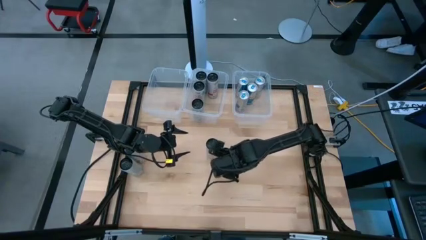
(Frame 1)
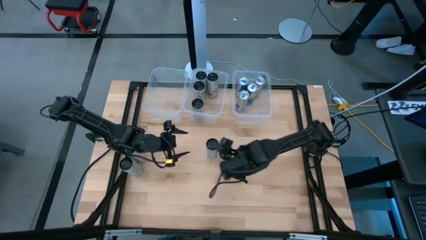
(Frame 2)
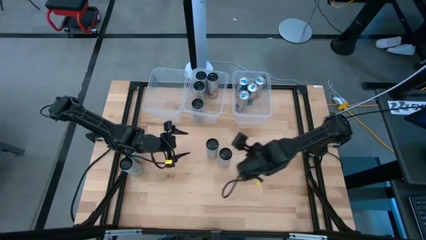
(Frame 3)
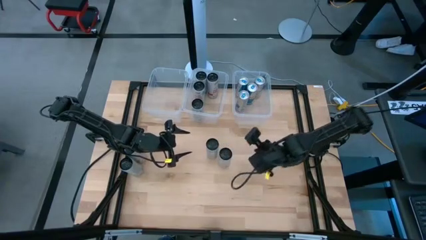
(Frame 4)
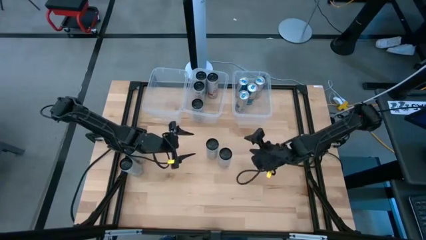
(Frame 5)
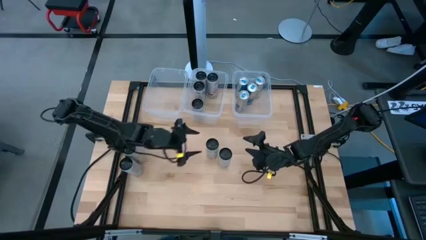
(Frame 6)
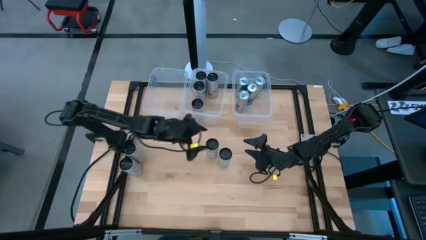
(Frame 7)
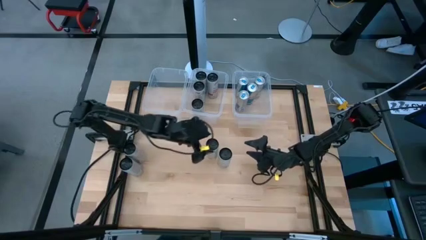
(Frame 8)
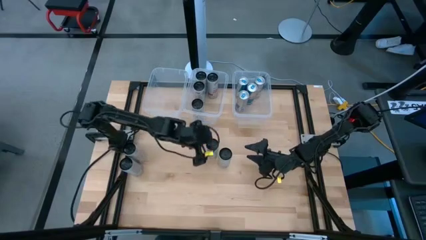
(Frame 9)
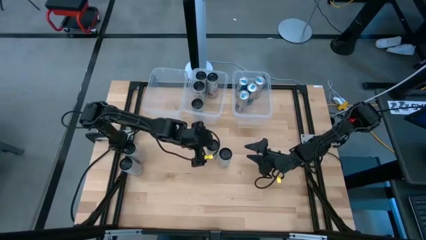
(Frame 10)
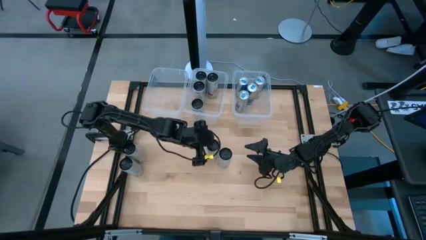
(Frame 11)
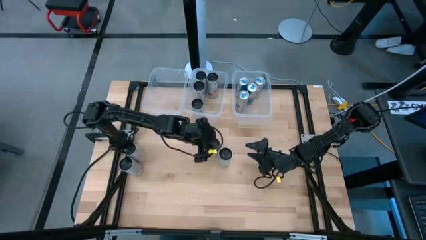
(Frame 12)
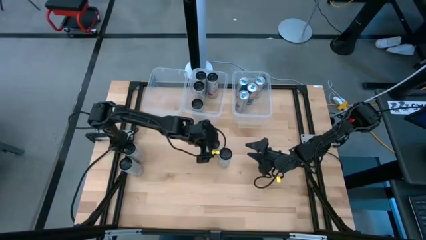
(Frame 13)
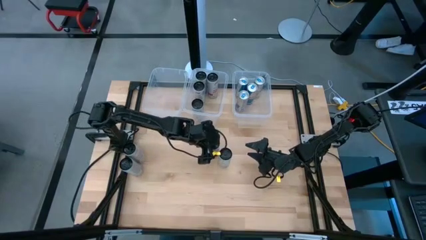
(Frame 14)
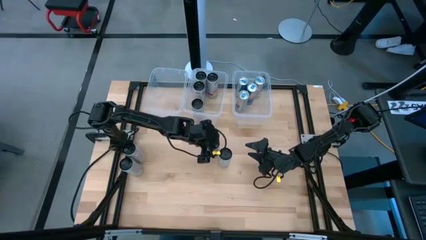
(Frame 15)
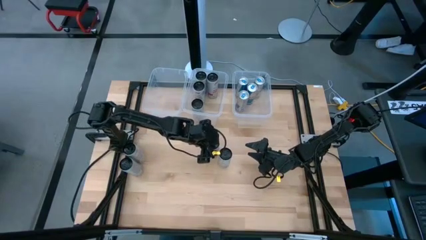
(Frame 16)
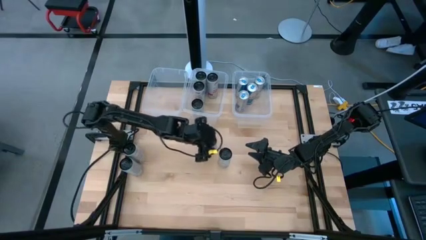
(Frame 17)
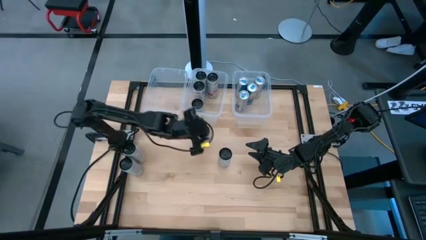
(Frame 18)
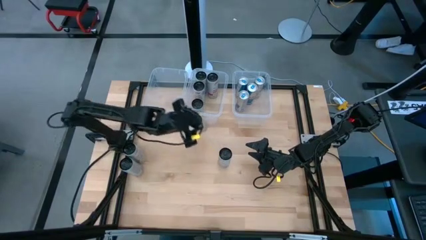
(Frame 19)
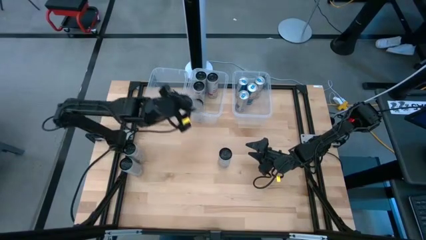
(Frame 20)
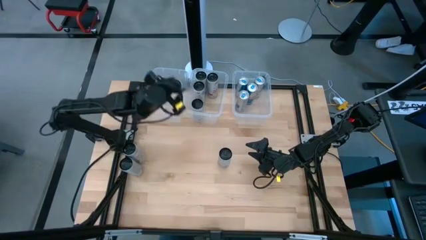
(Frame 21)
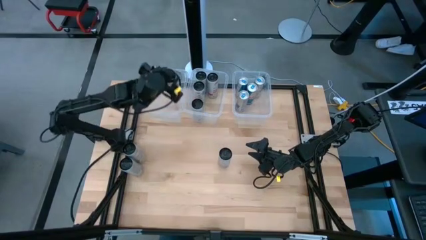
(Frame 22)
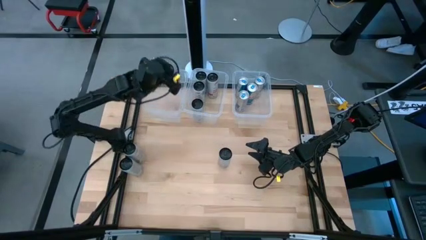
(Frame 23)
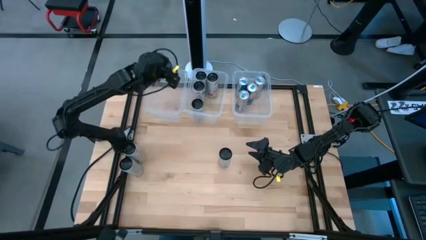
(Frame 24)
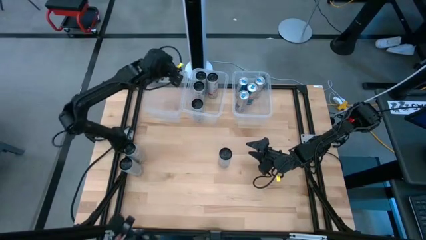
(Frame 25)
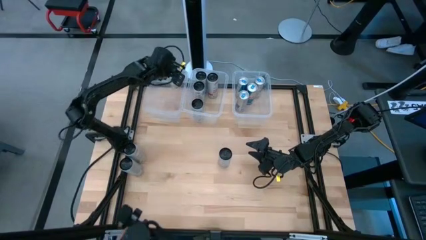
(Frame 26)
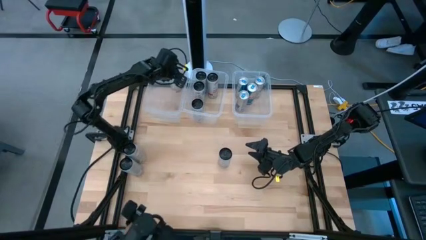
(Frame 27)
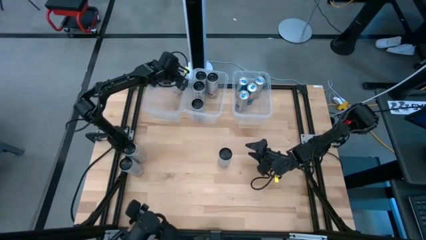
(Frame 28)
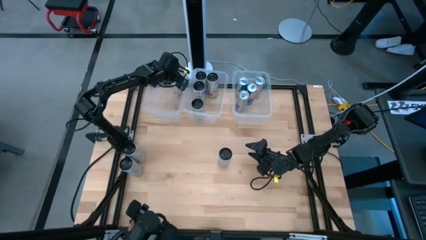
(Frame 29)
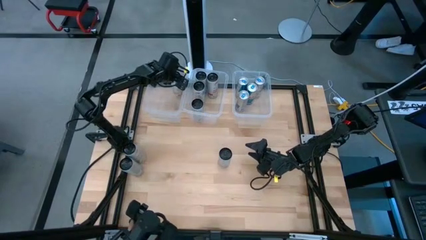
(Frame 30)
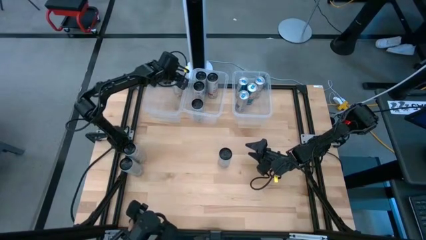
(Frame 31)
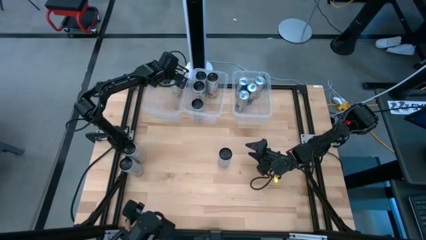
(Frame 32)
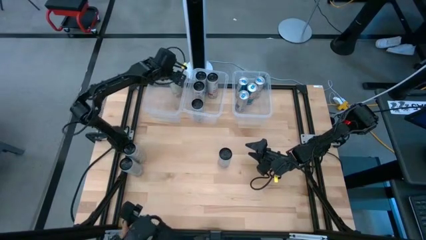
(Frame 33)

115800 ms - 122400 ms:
Task: Sort soda cans
Put the white-yellow soda can into the left transparent bin

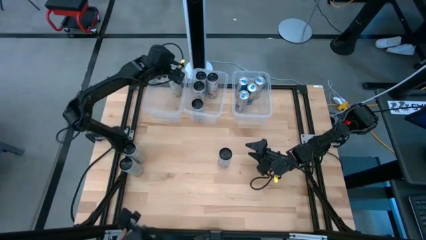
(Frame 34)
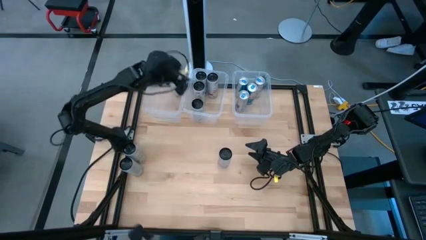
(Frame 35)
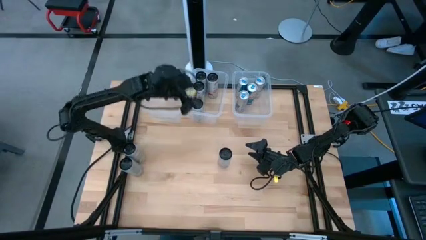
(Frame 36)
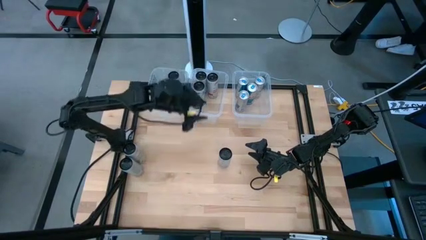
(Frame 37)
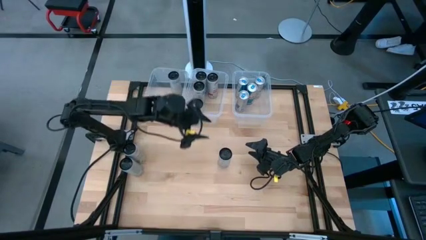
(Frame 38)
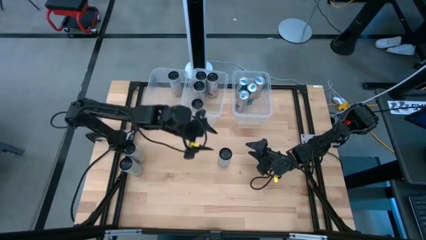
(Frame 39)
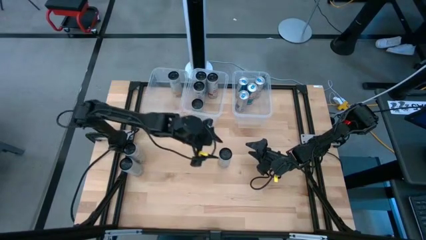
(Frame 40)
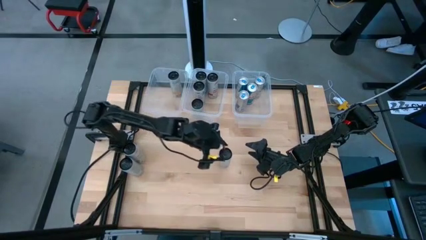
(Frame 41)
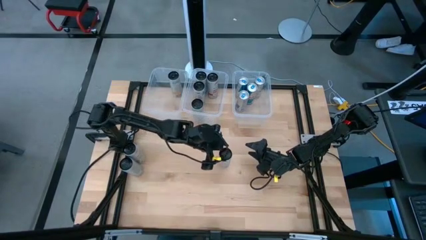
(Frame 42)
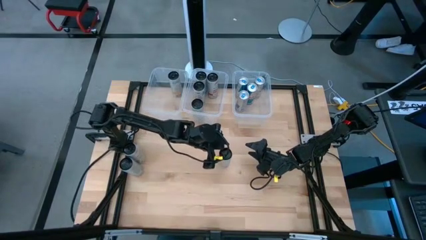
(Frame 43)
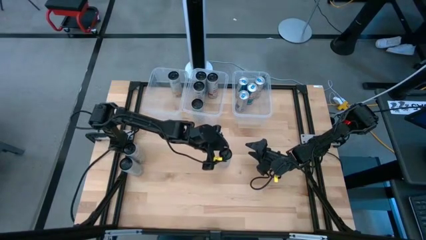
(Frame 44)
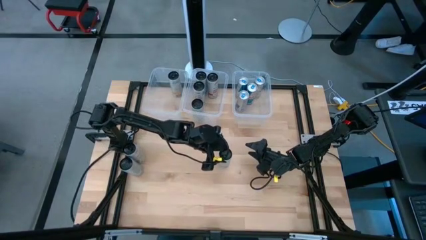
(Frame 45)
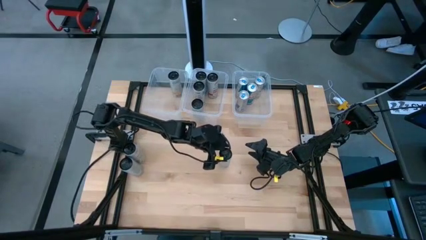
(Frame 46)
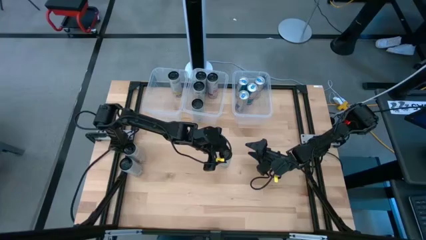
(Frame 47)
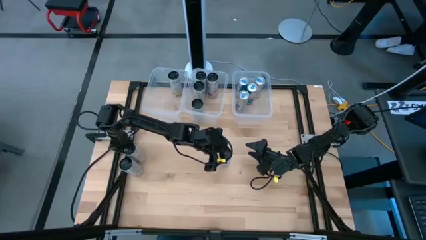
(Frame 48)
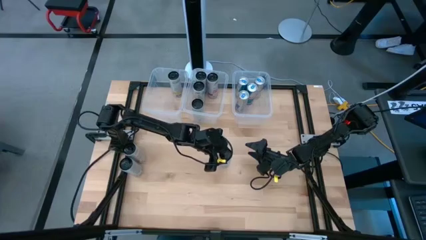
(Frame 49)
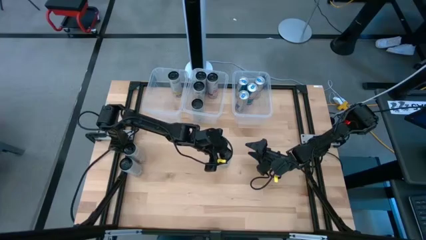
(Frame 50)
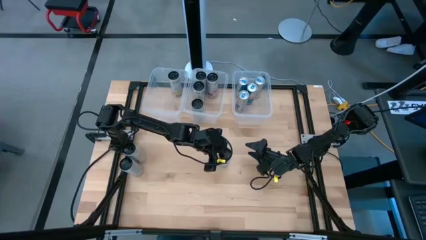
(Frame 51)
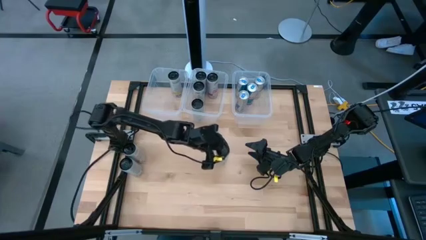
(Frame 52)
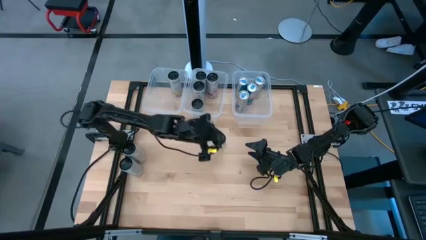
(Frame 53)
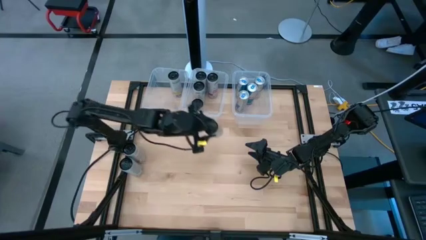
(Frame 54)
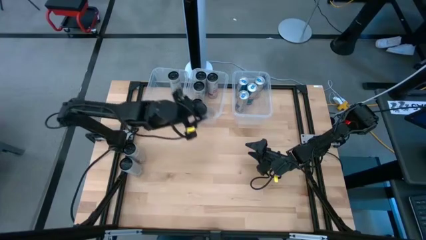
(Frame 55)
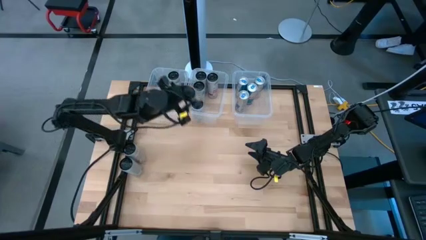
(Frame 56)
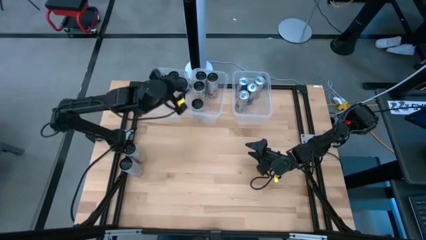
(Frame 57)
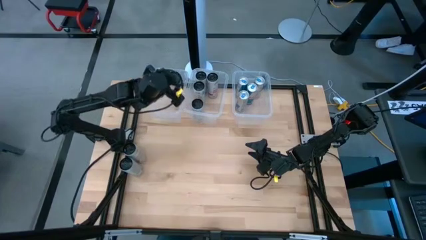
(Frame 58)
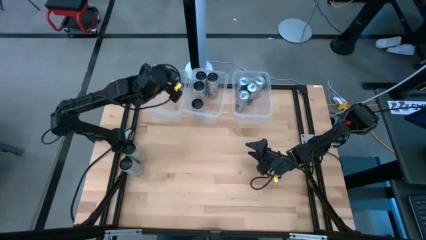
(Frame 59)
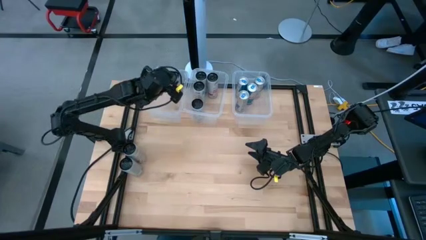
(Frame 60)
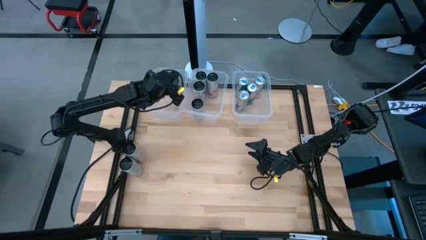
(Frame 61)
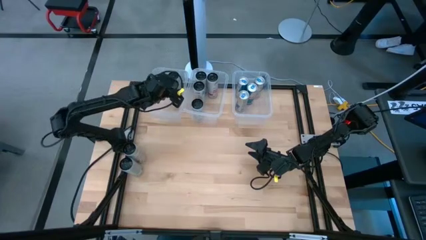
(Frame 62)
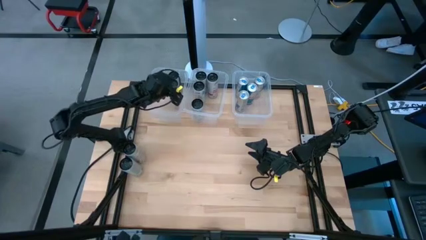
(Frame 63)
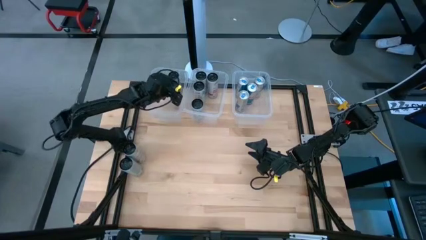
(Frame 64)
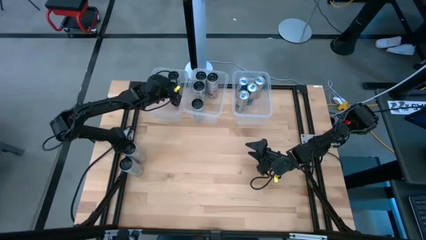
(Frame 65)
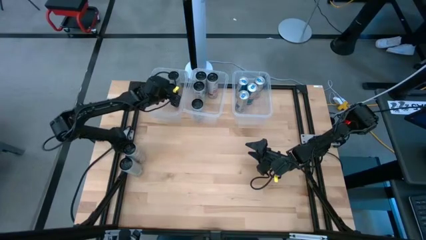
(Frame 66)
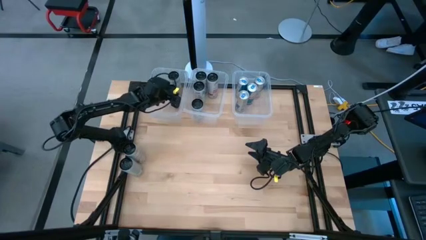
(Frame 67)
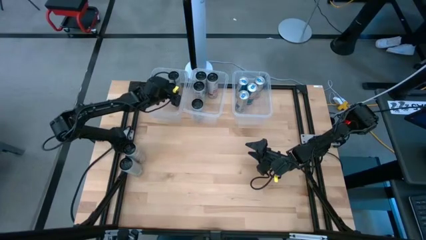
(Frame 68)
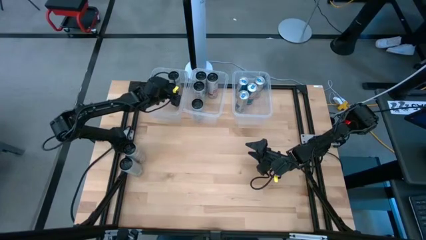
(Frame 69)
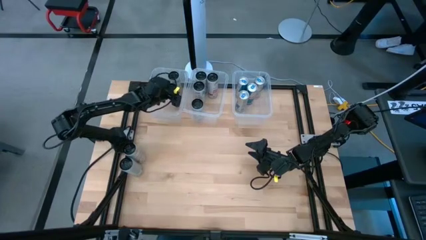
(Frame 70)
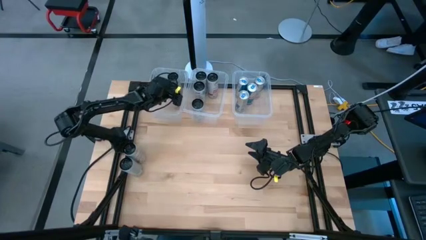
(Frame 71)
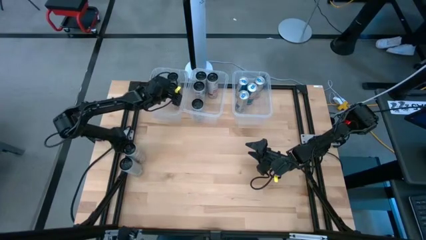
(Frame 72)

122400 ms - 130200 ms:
Put the white-yellow soda can into the left transparent bin

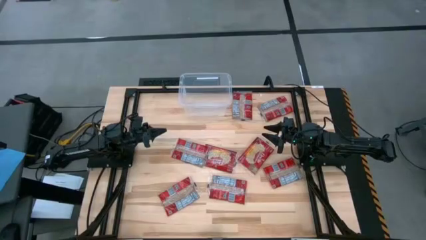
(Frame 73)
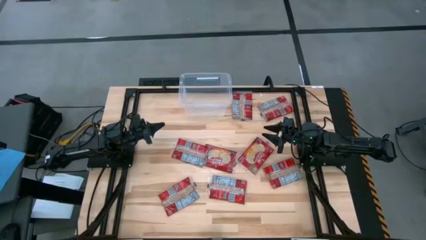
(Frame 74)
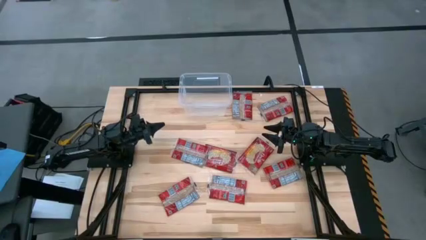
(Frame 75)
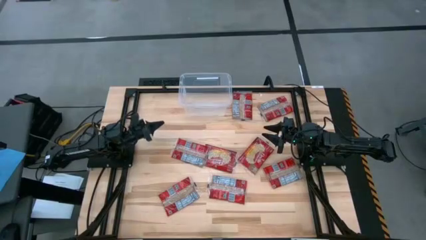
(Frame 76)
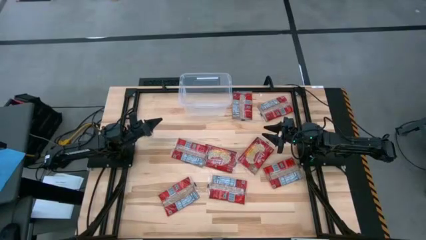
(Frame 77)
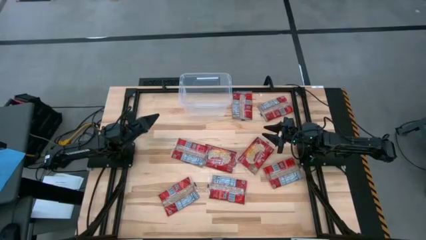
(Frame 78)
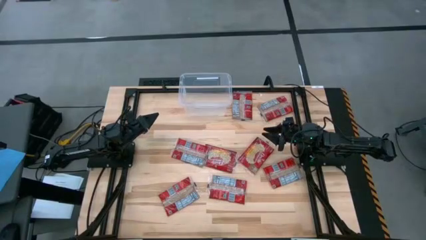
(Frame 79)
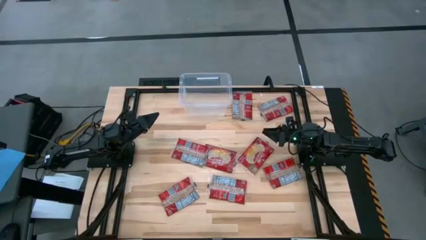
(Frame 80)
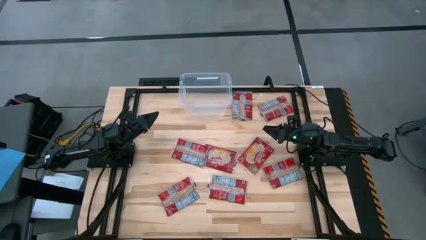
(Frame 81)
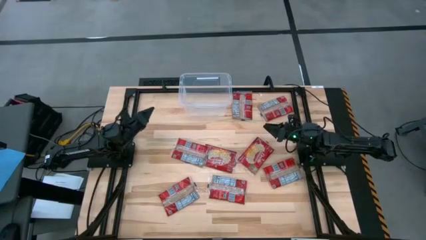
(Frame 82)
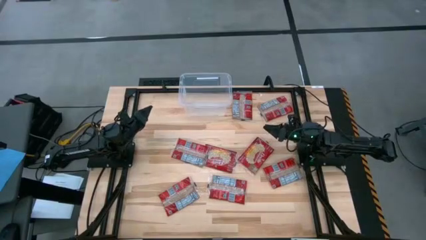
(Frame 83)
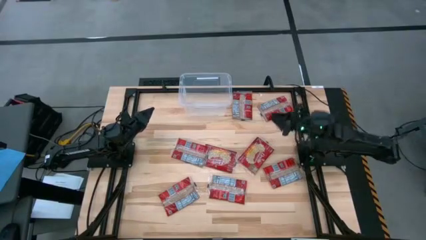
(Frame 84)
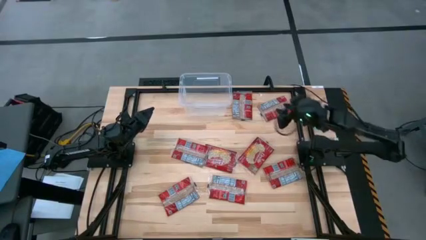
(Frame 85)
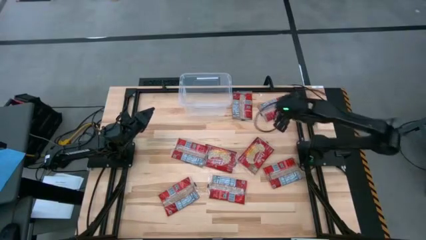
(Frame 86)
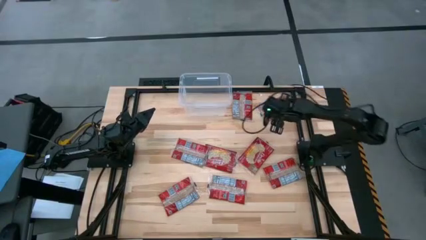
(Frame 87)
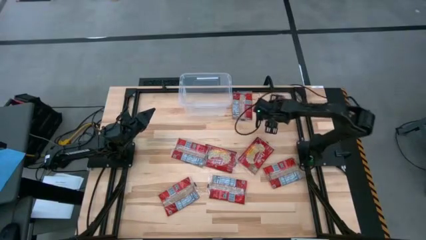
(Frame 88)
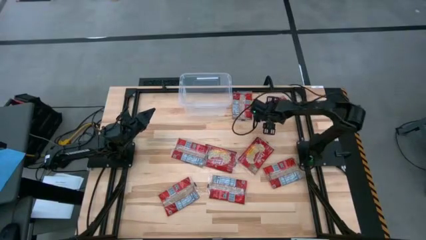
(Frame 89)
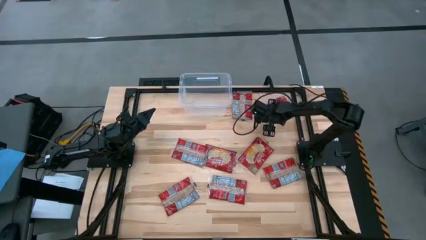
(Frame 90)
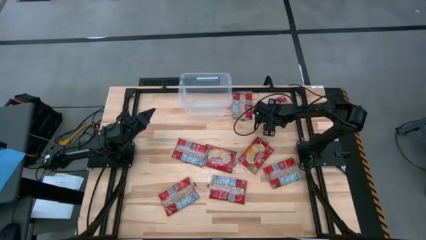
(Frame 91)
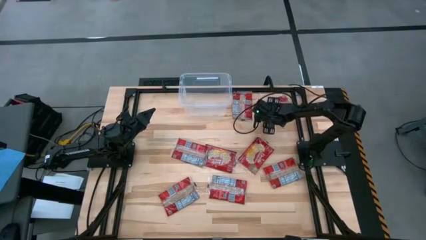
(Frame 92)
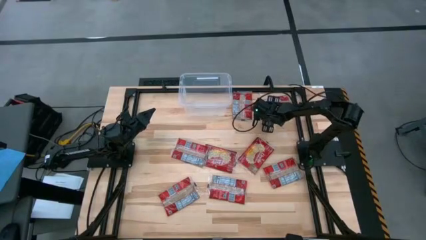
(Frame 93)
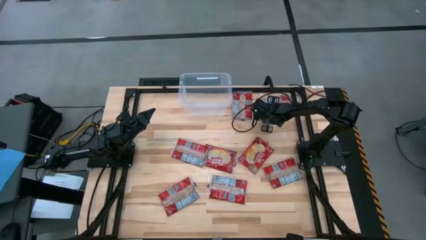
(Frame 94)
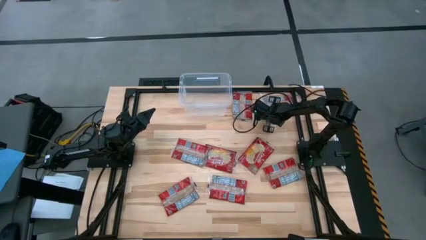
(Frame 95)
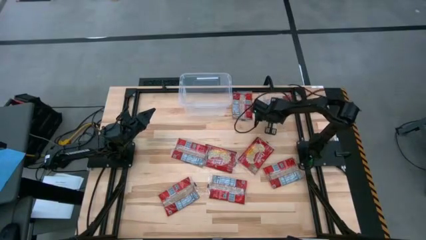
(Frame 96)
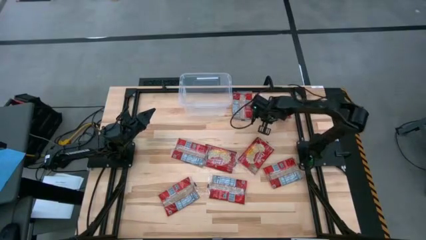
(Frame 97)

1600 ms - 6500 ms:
Task: Sort popcorn bags into baskets
Put the red popcorn bag into the transparent bin
